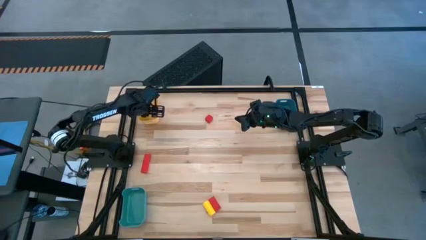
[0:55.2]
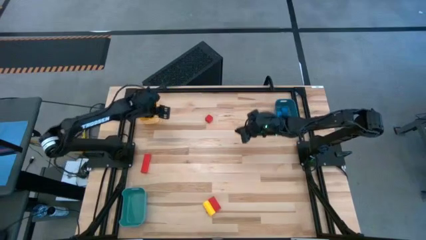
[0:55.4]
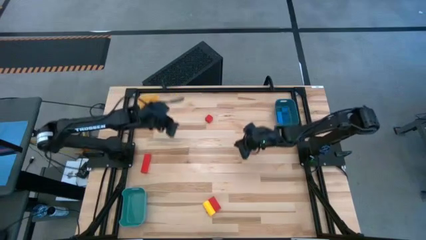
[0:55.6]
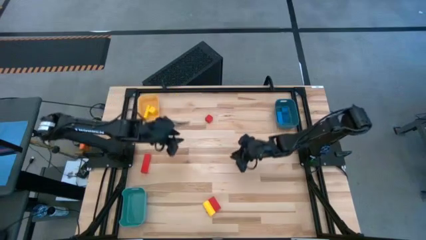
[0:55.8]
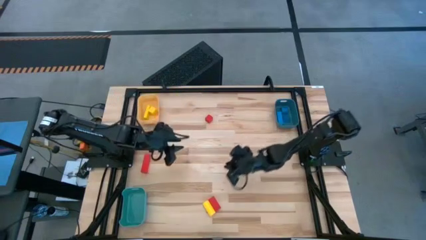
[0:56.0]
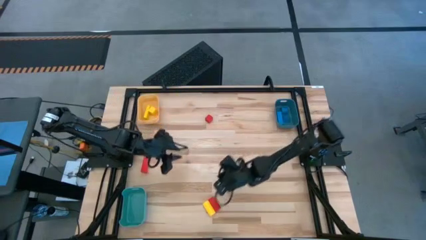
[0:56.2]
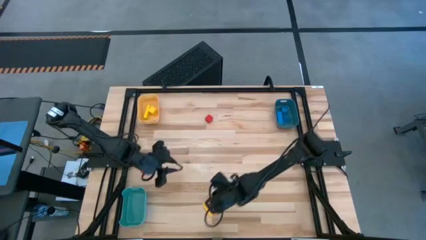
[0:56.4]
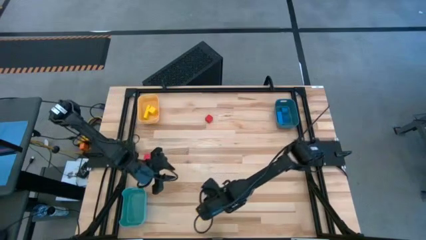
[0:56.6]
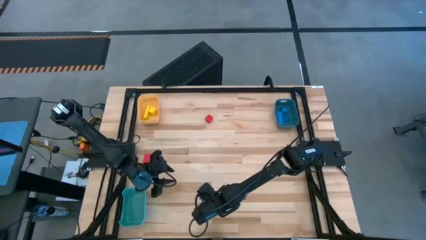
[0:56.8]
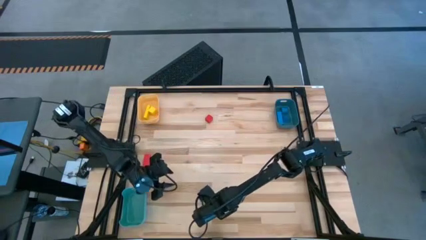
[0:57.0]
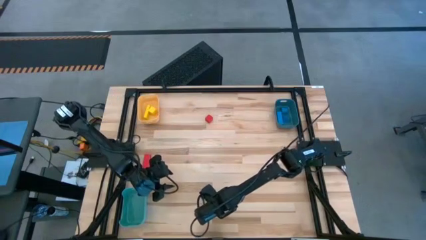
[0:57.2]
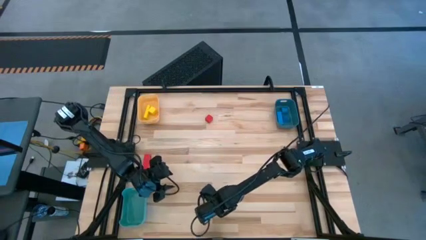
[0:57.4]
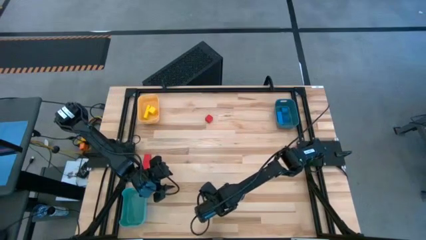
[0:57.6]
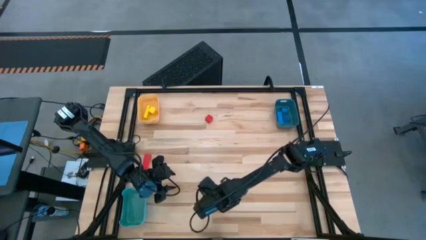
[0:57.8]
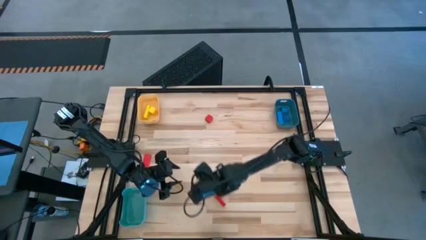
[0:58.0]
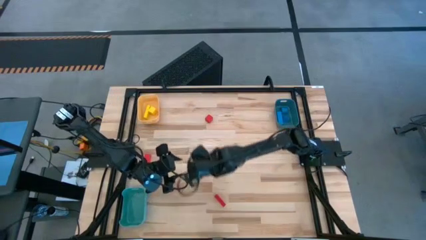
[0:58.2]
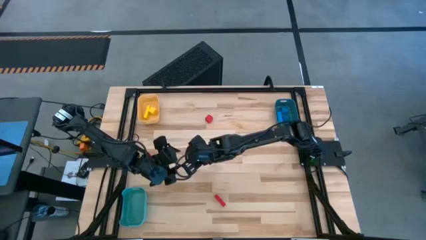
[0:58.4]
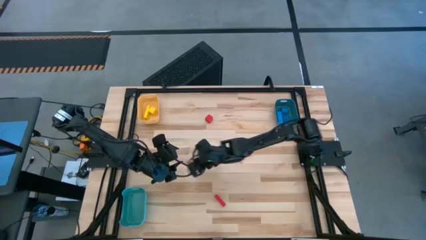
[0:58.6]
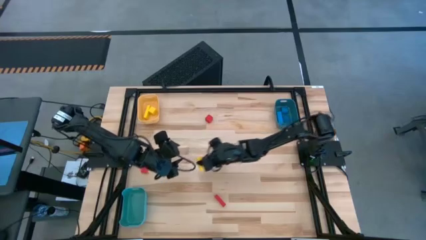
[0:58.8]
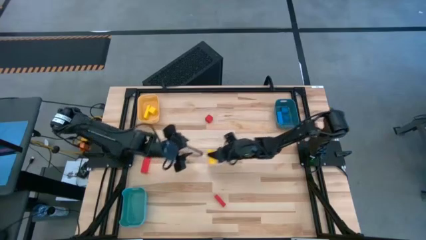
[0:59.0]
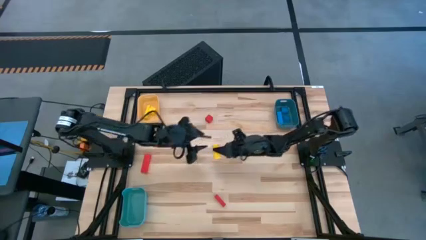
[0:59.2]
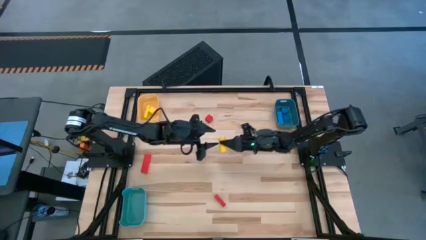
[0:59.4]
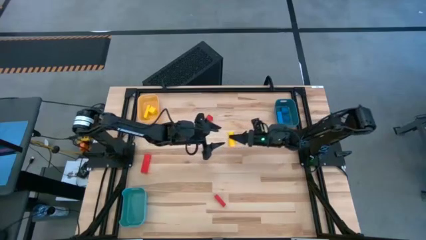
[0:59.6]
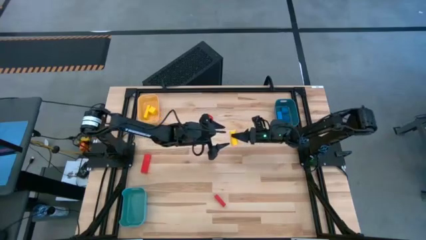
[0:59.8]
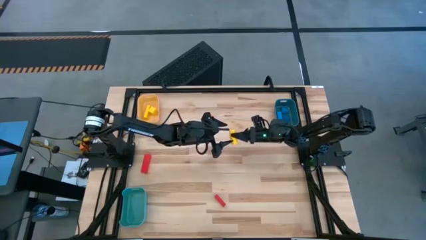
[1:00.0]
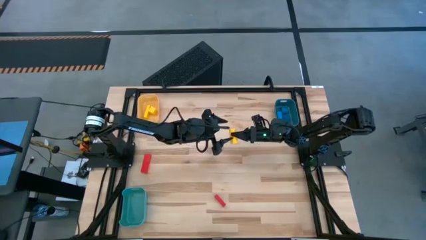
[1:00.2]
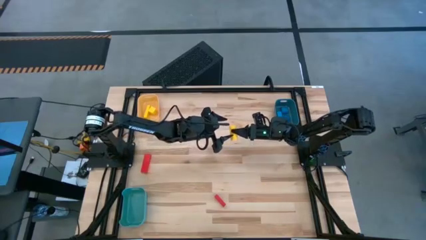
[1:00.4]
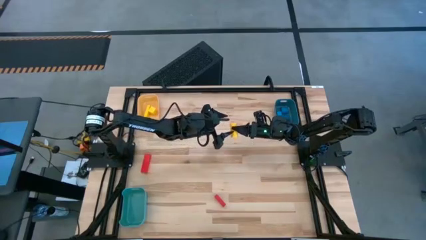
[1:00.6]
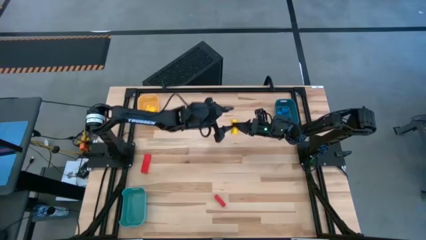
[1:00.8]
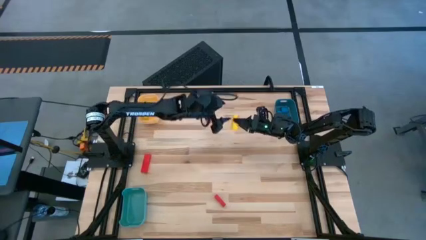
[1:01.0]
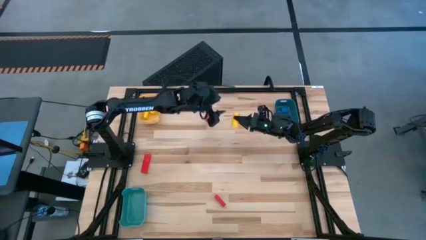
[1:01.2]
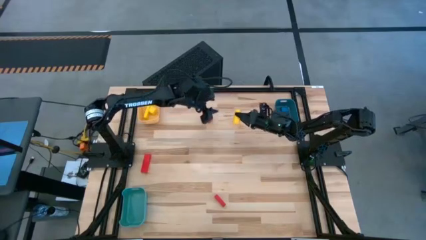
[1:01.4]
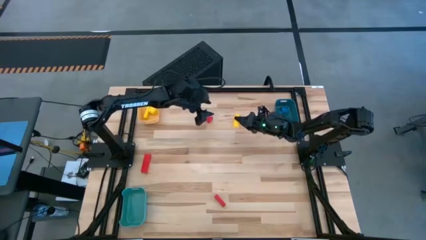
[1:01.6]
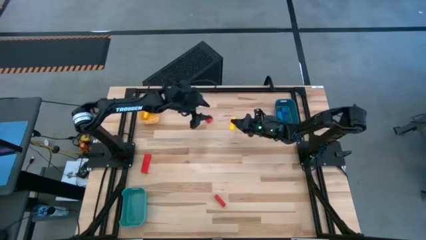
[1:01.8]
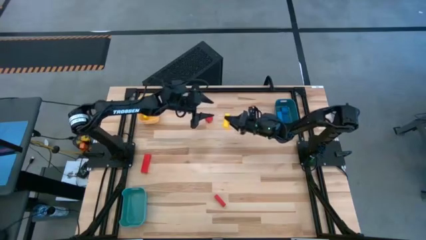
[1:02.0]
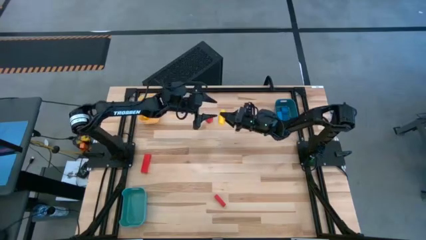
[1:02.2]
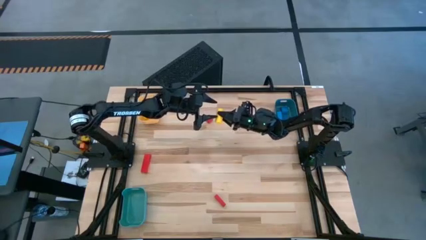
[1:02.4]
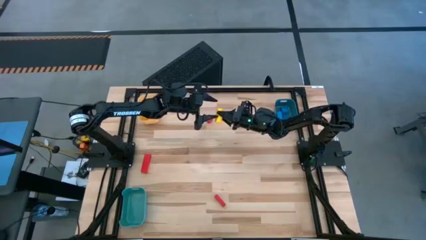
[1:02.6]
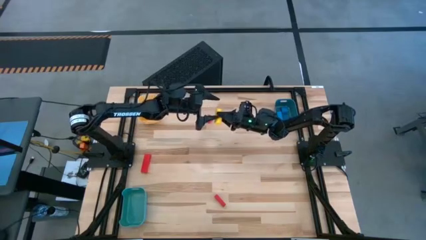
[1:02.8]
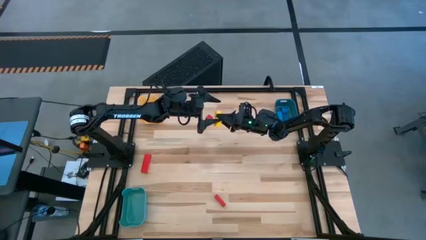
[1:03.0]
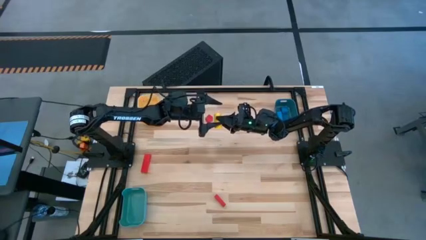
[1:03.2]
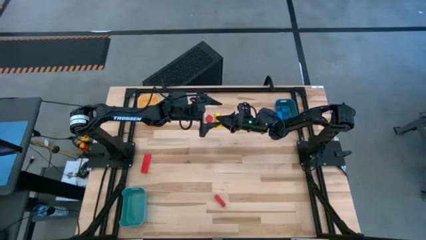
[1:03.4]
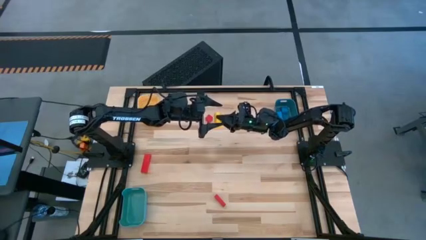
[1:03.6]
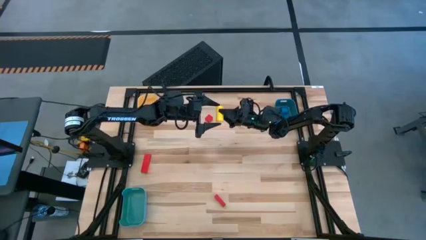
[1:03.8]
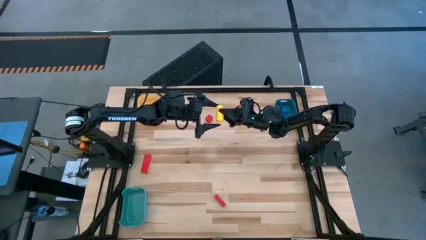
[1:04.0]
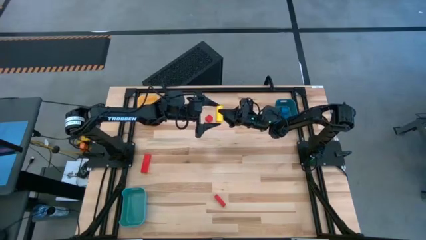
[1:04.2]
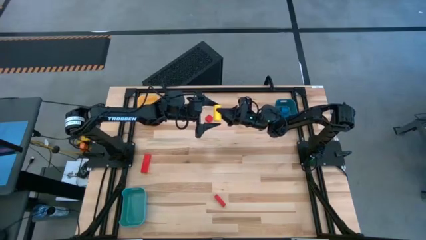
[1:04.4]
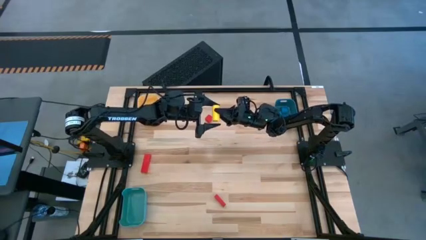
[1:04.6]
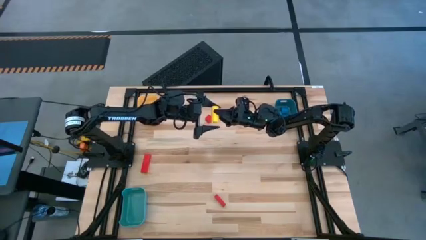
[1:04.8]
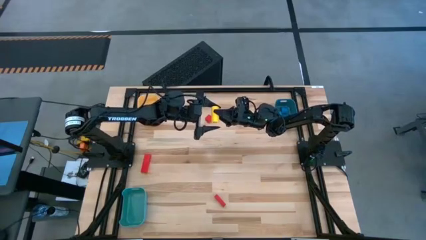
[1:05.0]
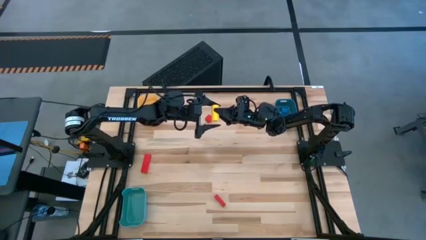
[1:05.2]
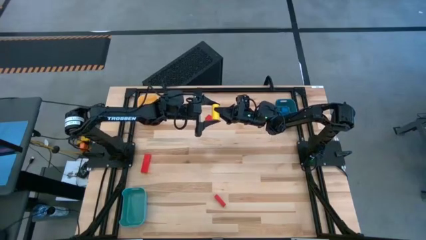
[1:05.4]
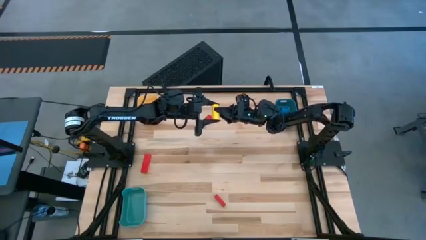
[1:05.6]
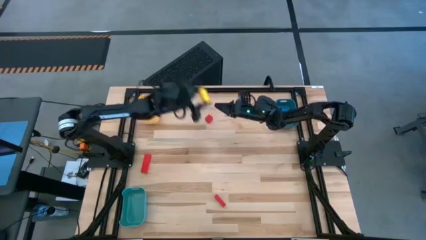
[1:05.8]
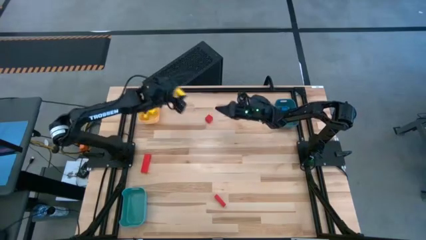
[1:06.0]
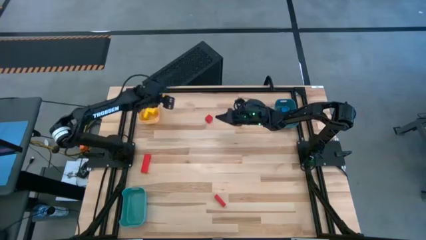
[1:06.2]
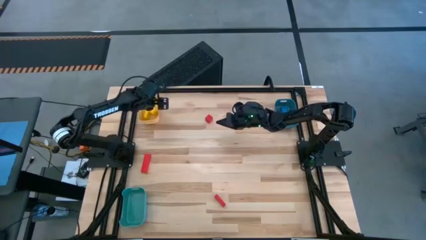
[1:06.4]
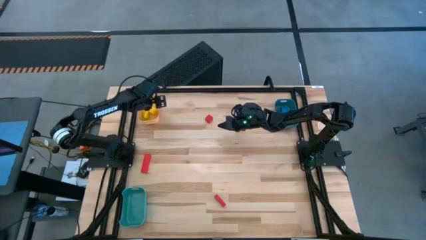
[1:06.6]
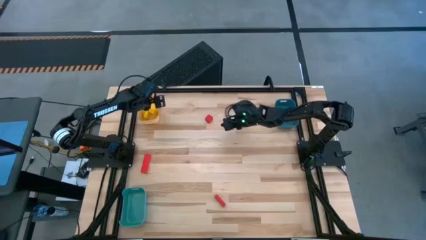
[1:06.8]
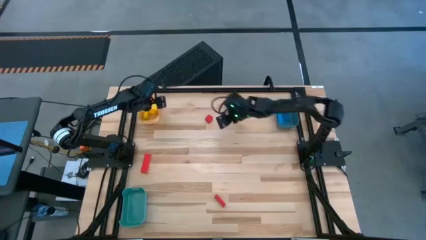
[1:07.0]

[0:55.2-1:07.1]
Task: Sort & place blocks by color
Put the yellow block into the yellow bin

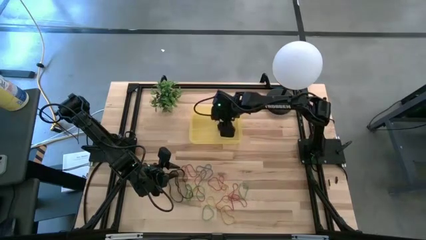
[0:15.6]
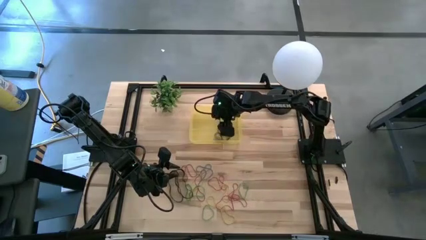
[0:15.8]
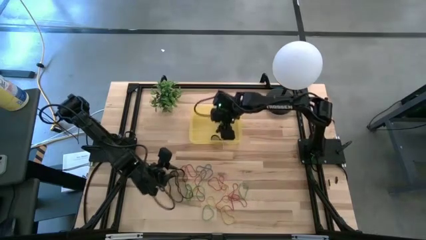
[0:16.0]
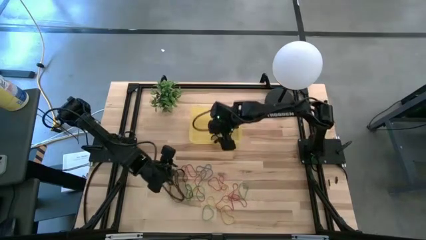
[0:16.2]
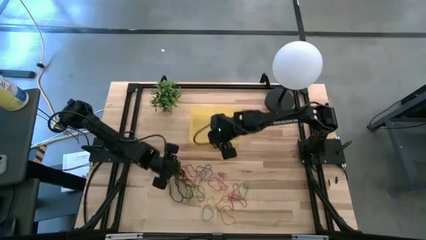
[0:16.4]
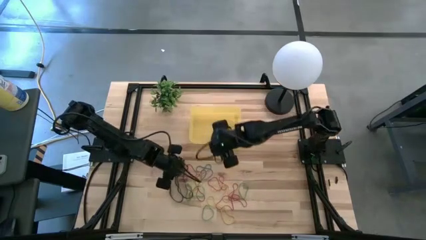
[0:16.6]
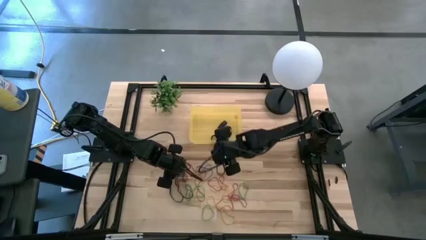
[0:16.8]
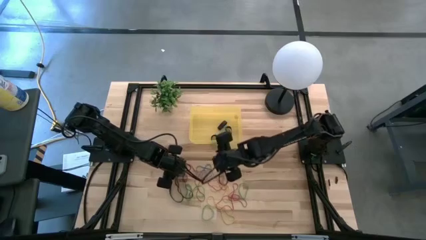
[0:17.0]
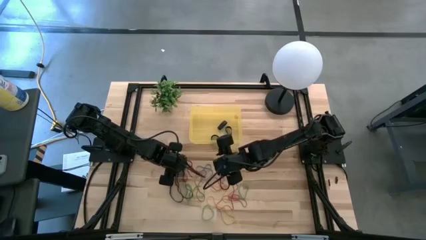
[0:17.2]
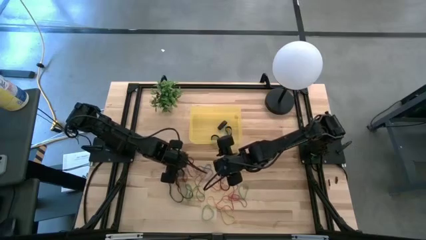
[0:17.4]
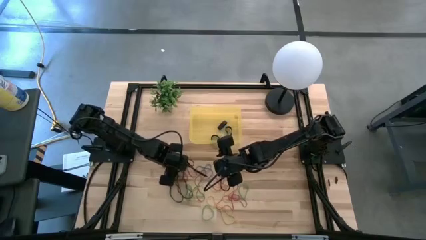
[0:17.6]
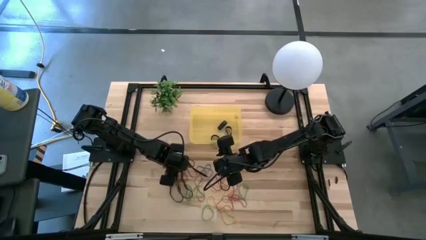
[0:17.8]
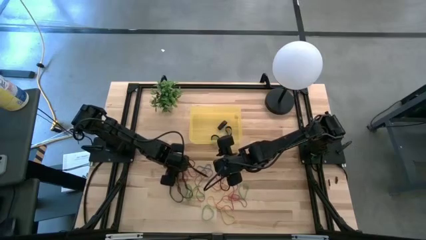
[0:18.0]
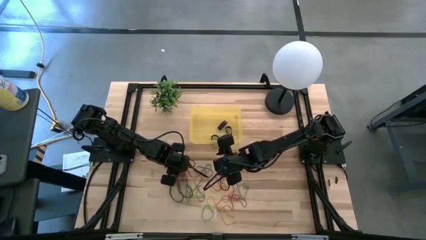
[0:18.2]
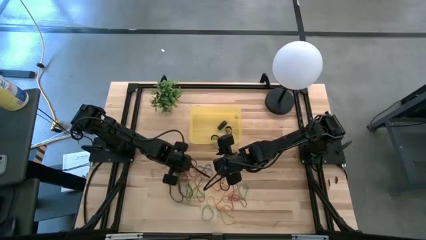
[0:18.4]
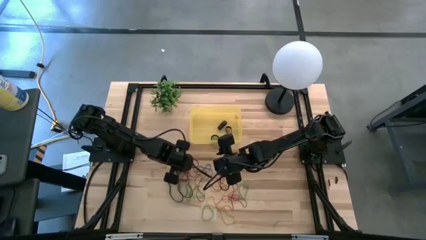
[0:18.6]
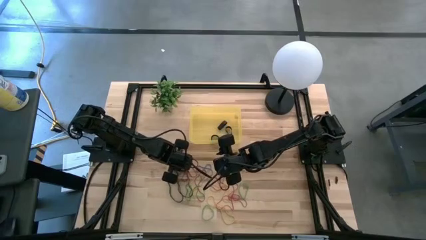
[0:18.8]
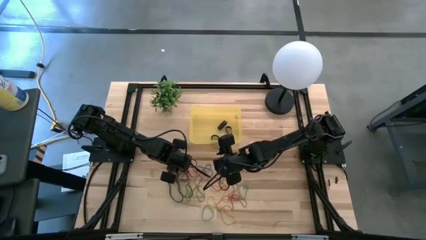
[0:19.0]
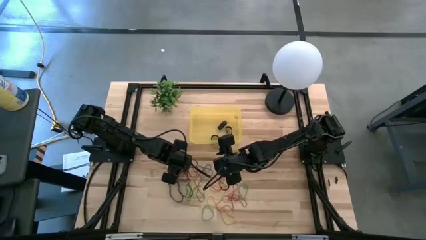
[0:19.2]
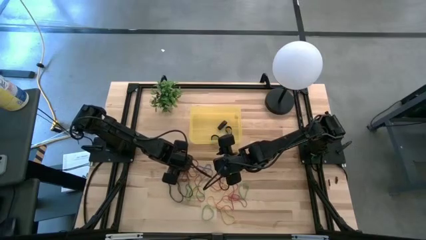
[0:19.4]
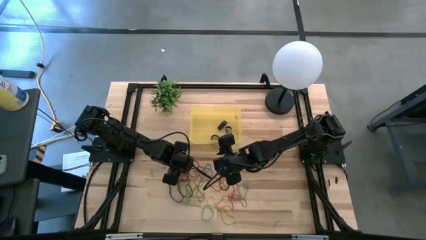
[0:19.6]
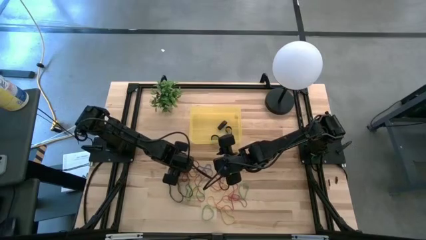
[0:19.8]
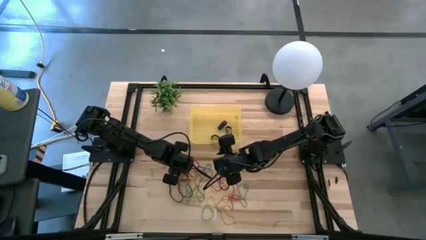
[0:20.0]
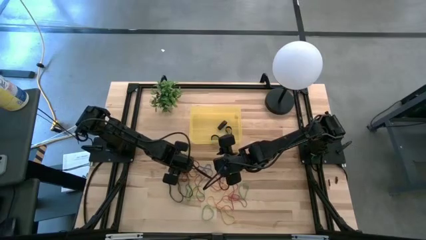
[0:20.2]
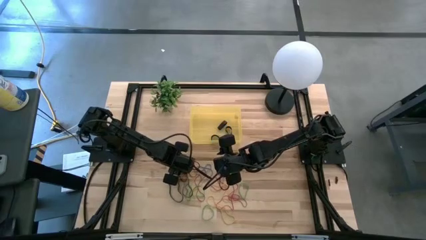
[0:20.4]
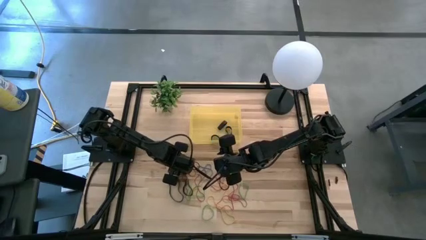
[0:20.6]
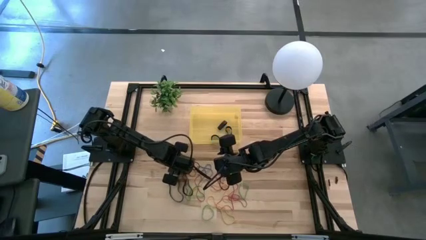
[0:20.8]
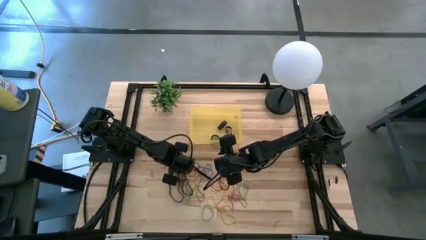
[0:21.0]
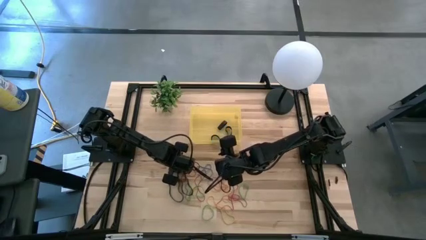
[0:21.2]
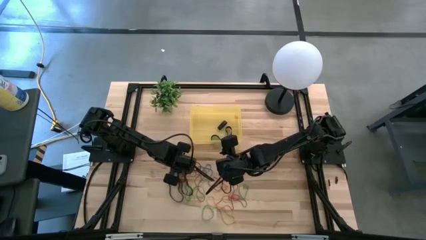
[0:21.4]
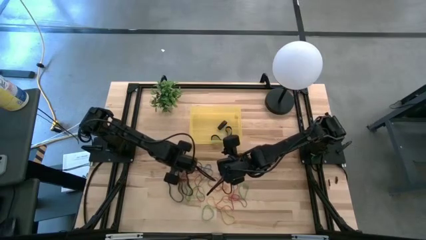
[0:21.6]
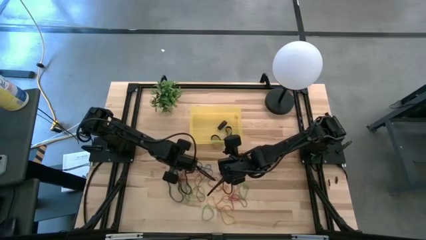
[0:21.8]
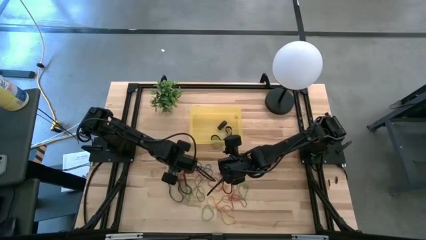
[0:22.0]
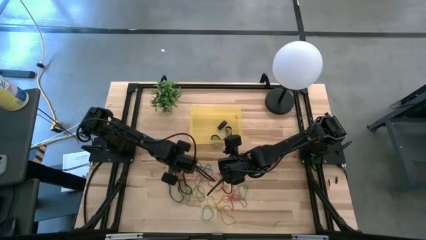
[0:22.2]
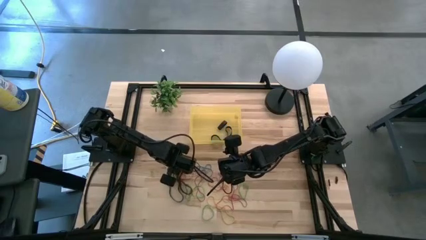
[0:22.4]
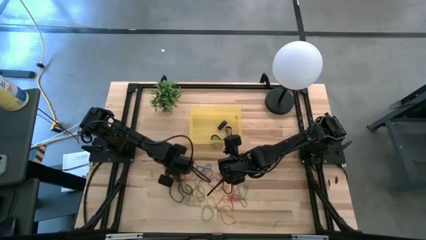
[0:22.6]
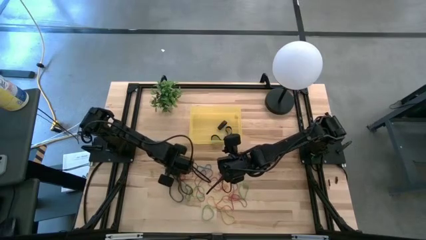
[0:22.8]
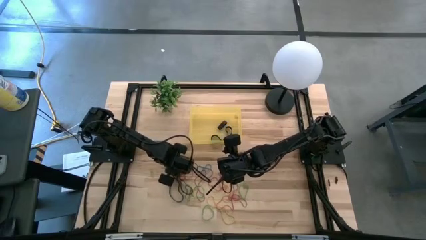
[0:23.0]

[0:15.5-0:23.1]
Task: Pick and place rubber bands into bin
Put the black rubber band into the yellow bin
